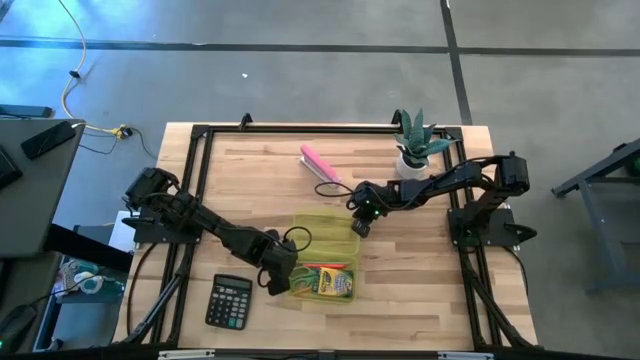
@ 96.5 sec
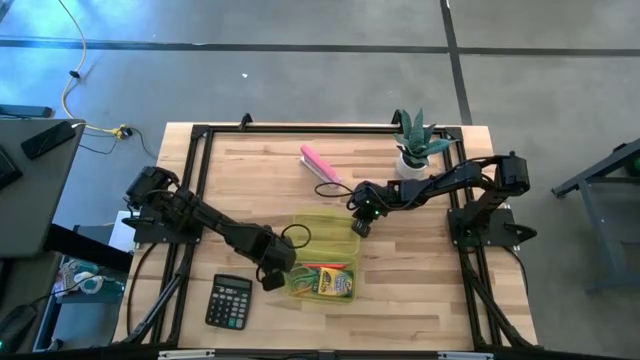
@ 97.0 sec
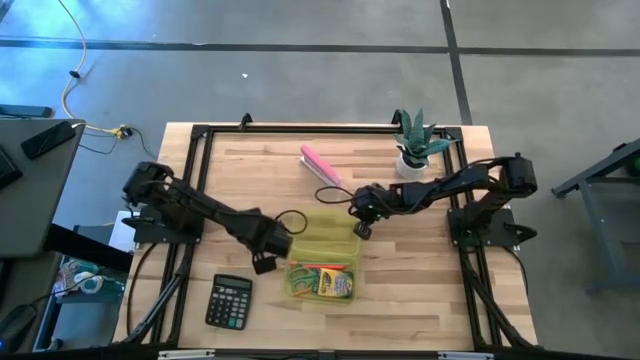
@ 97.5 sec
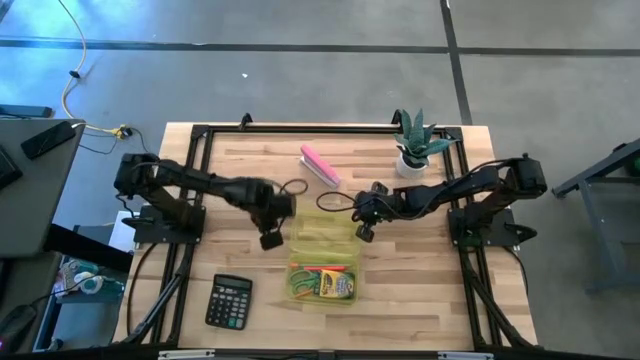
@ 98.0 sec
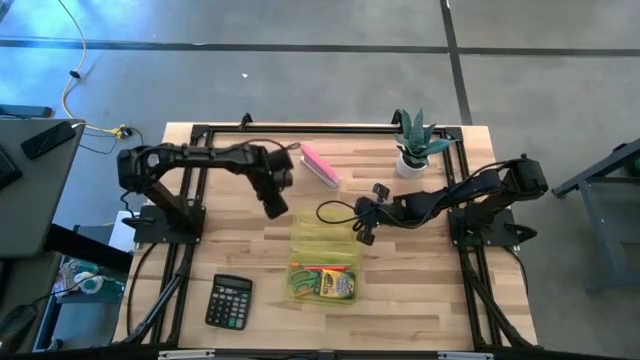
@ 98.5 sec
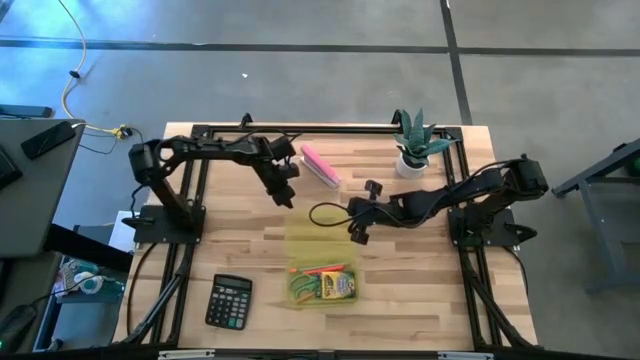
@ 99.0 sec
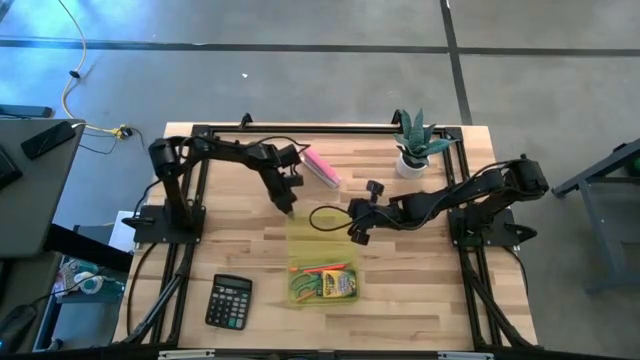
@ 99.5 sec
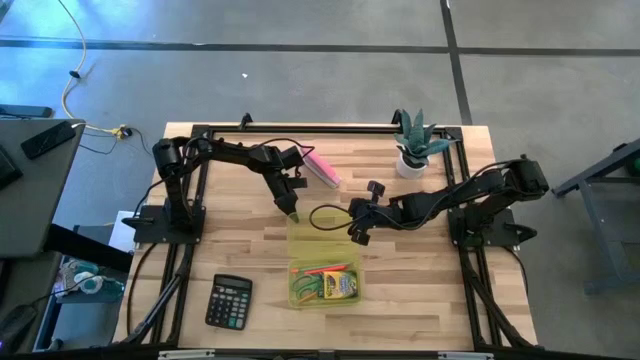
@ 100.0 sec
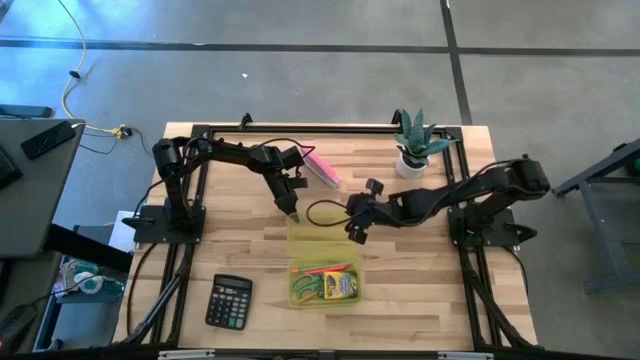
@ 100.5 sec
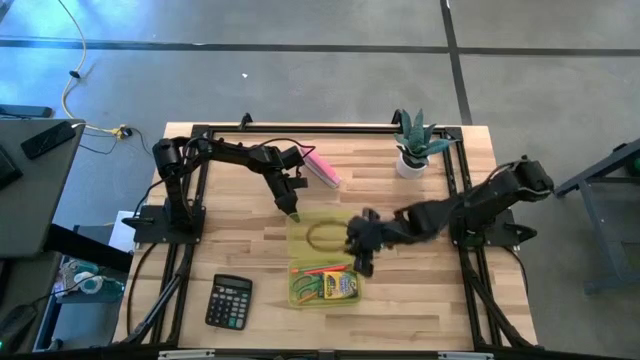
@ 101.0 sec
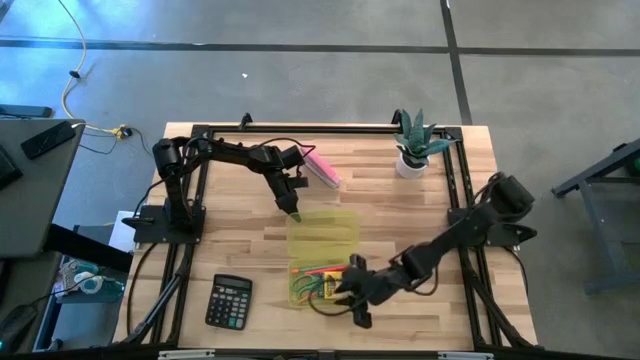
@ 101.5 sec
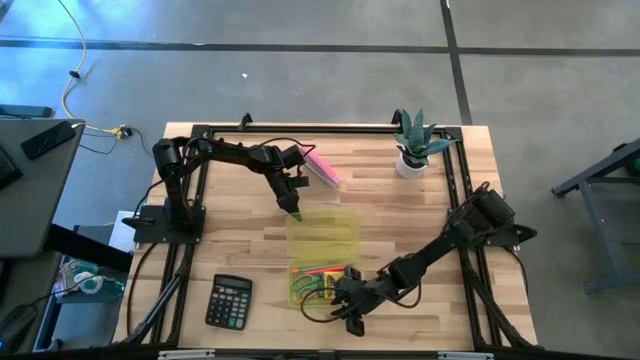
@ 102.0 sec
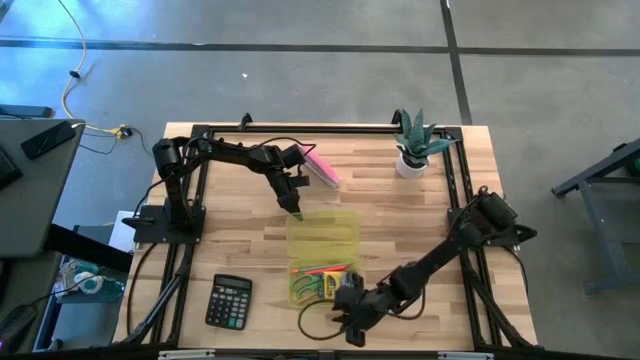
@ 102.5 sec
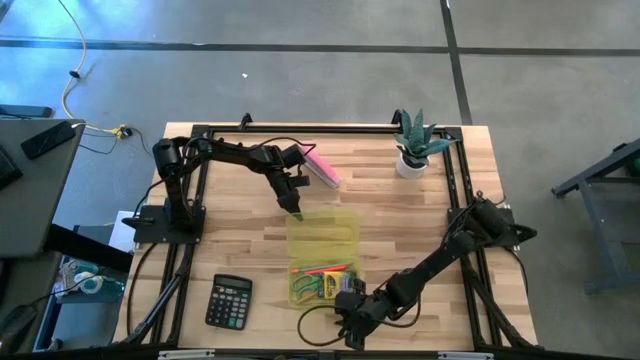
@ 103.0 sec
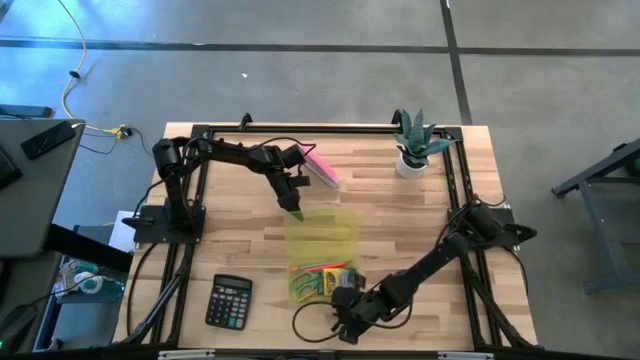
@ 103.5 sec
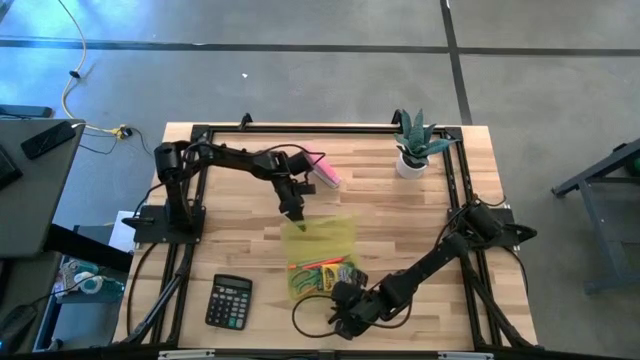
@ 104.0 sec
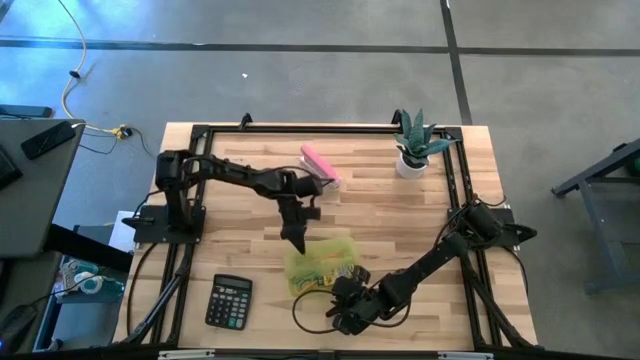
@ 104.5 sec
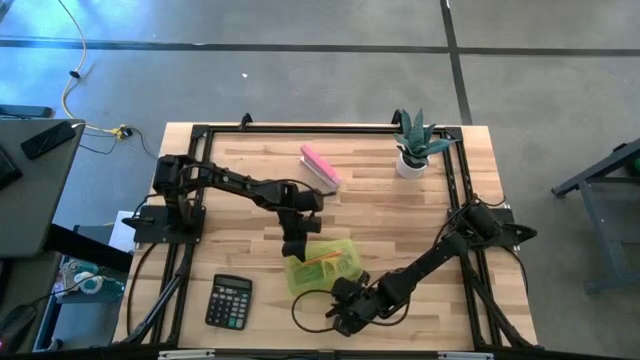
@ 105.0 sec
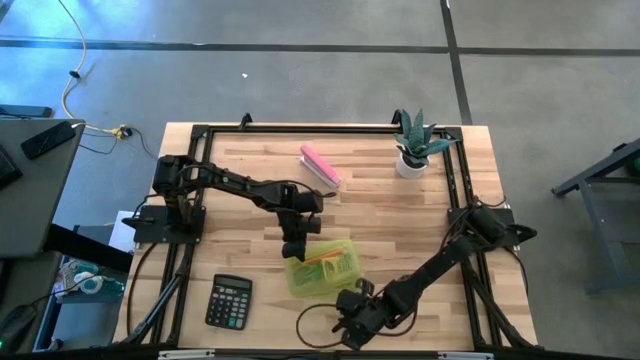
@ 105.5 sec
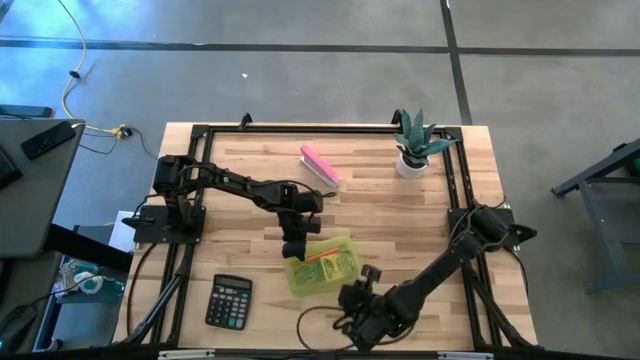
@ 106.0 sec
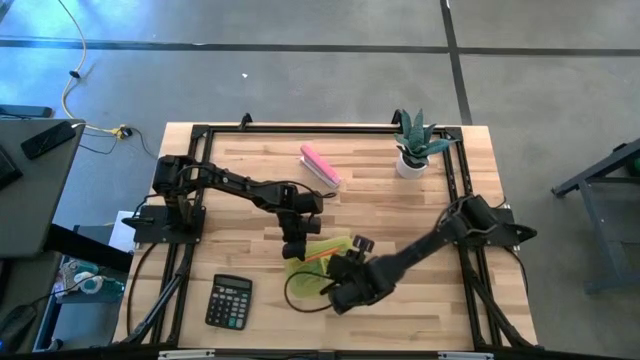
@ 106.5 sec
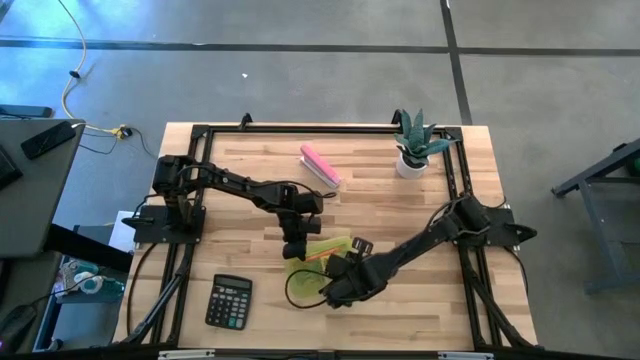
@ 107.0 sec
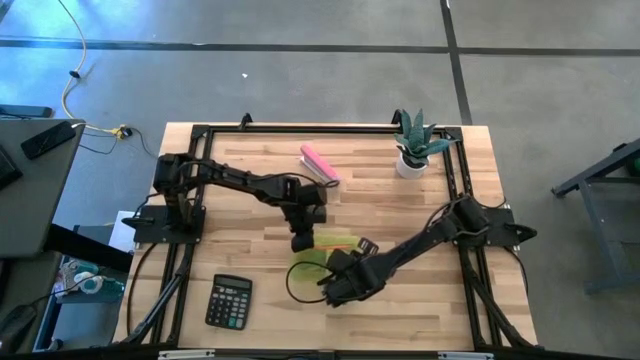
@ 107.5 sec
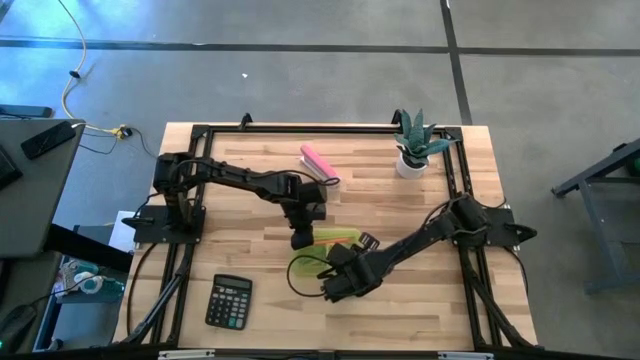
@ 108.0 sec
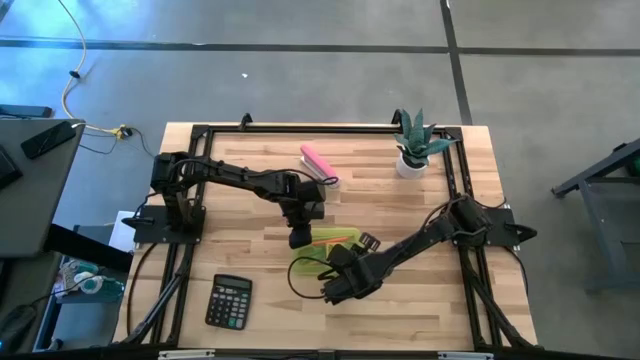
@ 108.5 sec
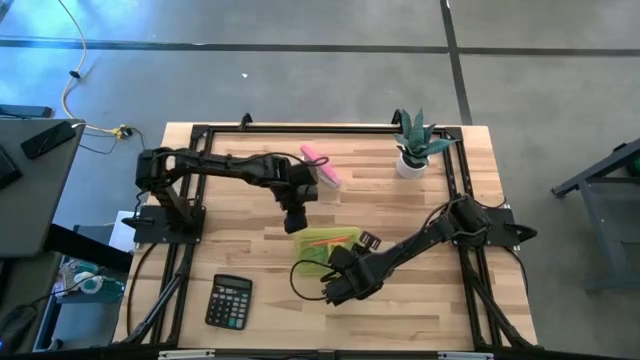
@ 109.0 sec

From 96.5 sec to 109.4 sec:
Task: Pack school essentials
Close the yellow supply box

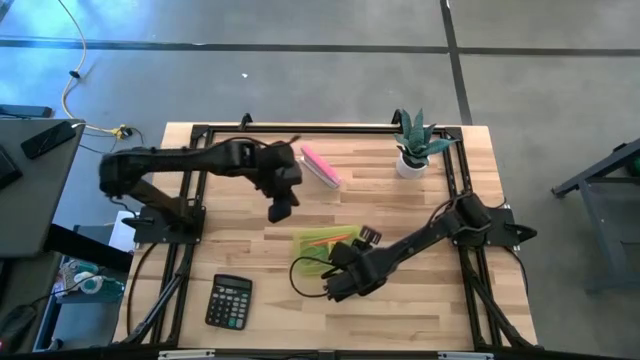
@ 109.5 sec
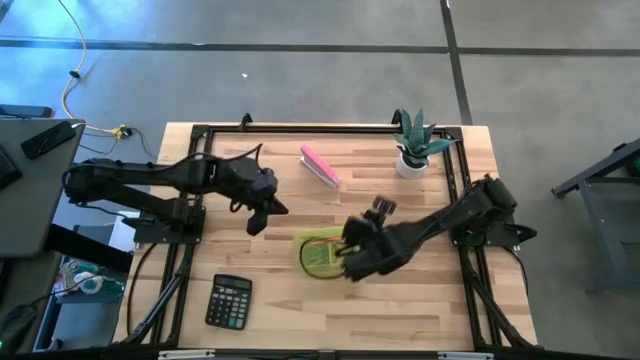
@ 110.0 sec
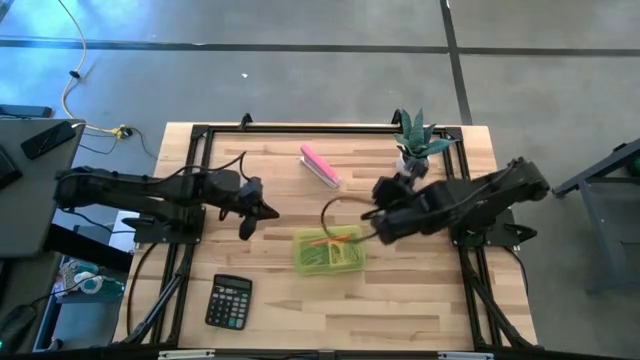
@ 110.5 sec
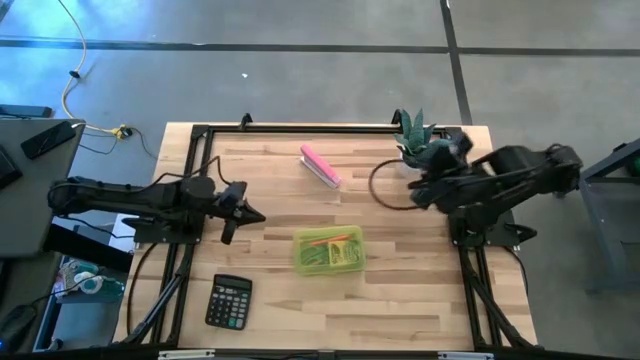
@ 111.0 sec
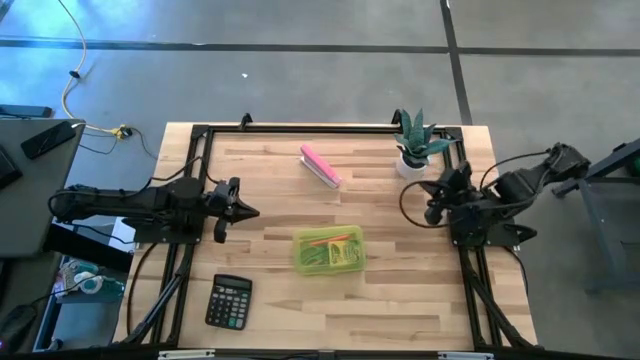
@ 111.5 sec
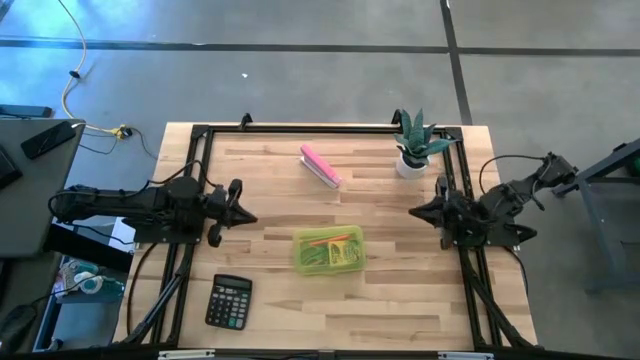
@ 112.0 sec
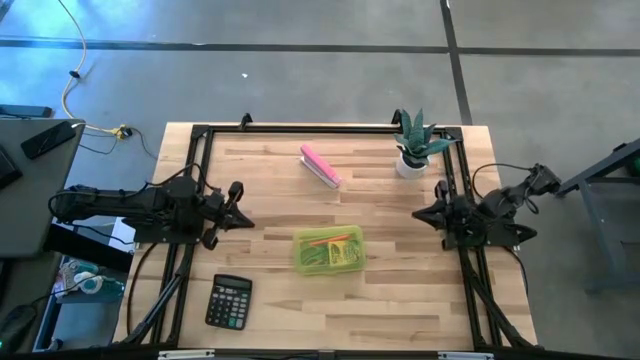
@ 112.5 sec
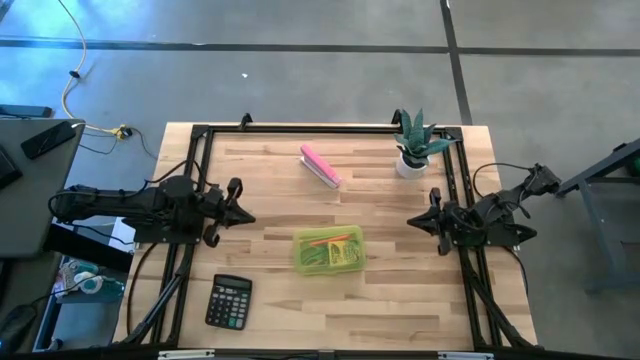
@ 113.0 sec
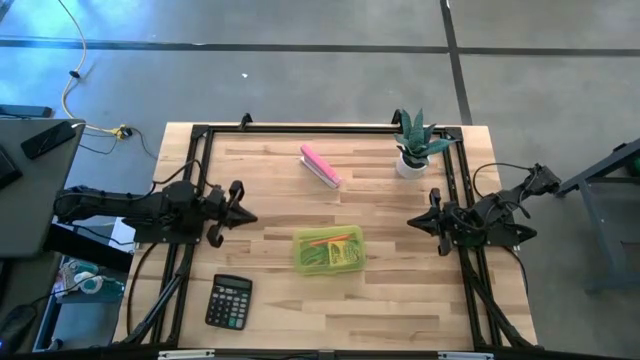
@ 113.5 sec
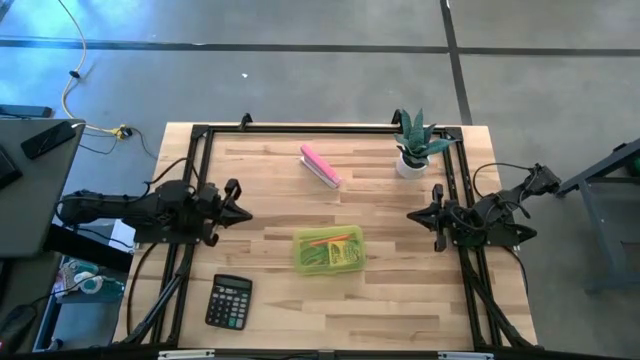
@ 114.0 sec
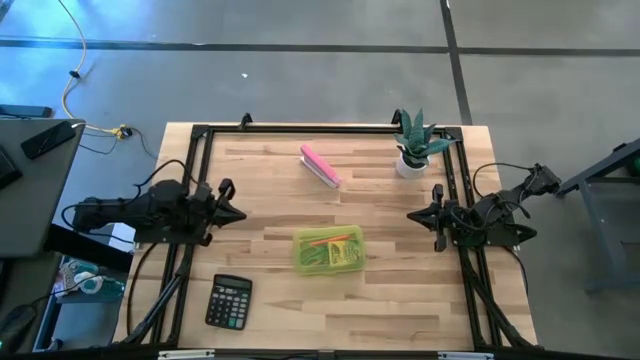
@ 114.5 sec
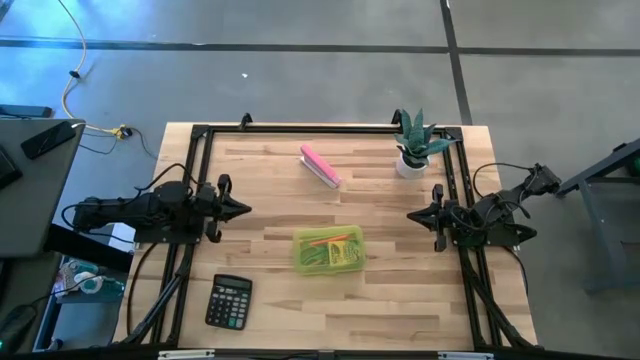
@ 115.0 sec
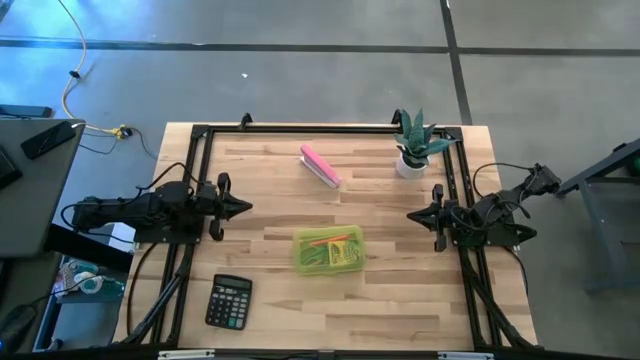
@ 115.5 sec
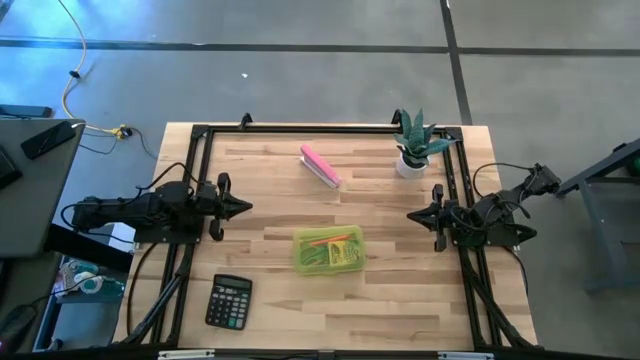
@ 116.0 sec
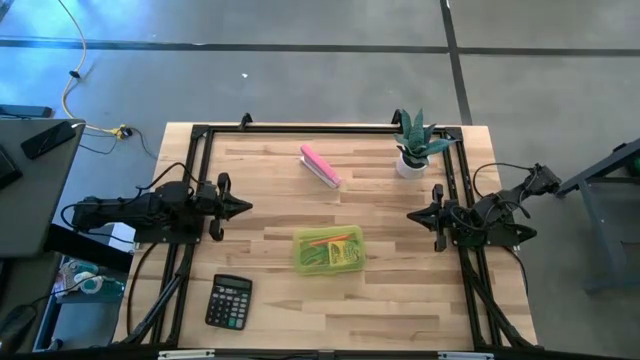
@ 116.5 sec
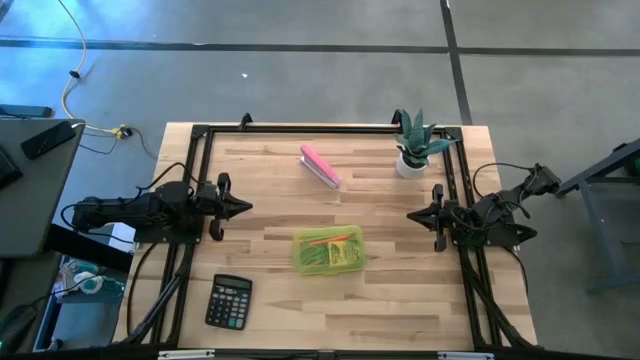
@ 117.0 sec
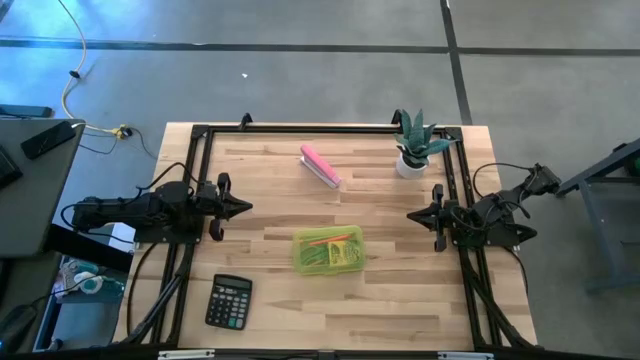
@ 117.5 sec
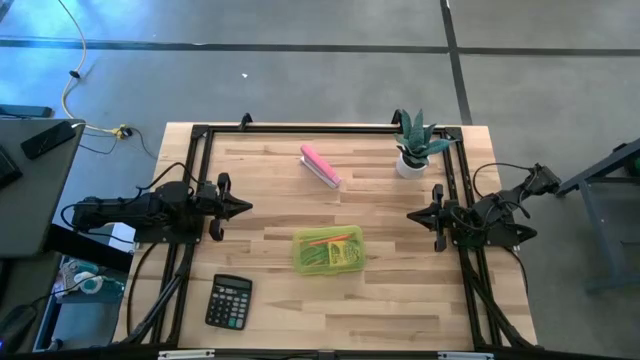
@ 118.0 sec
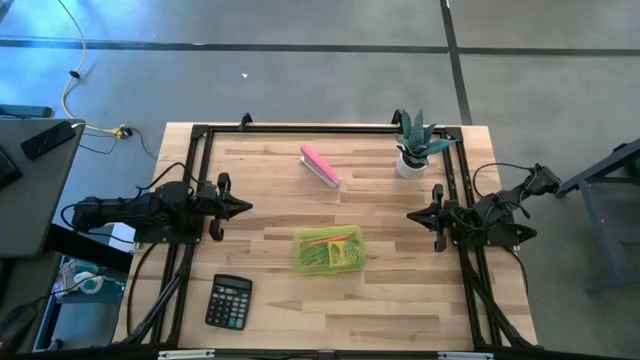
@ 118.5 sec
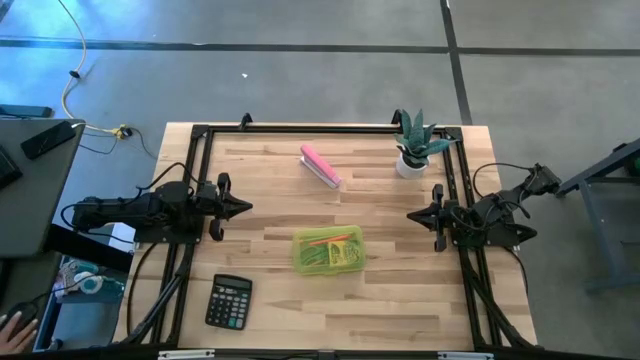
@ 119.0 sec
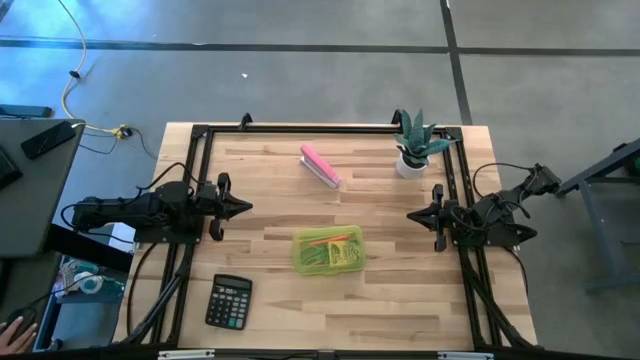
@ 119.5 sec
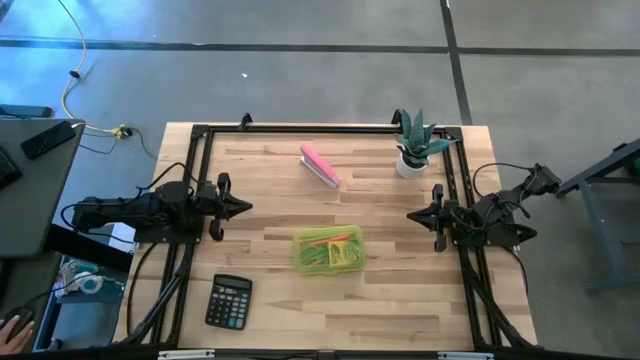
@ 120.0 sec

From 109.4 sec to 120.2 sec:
Return to Home Position
